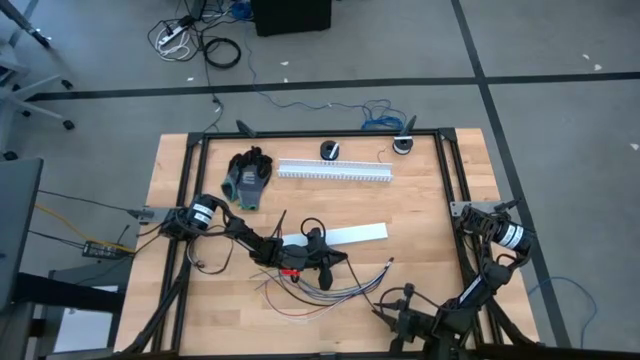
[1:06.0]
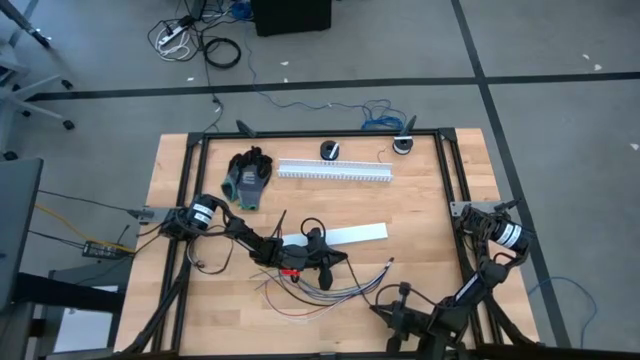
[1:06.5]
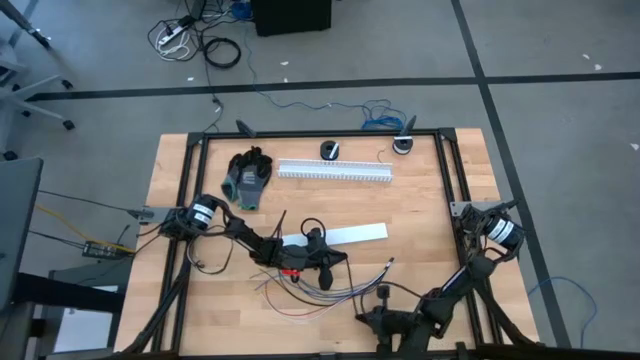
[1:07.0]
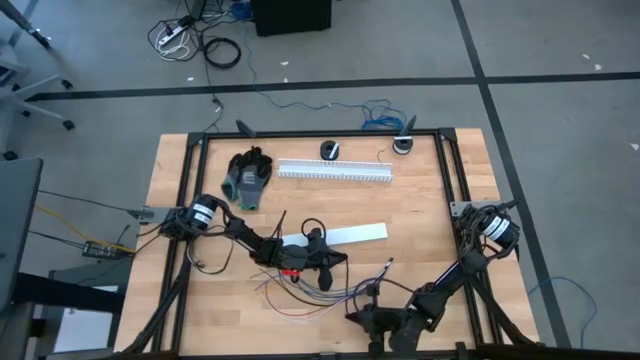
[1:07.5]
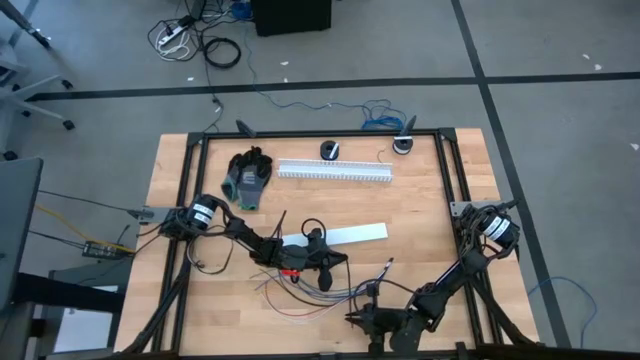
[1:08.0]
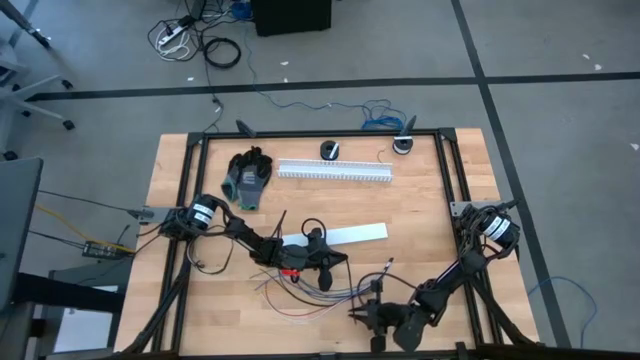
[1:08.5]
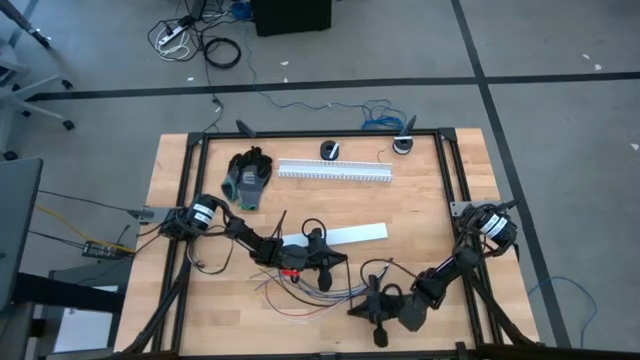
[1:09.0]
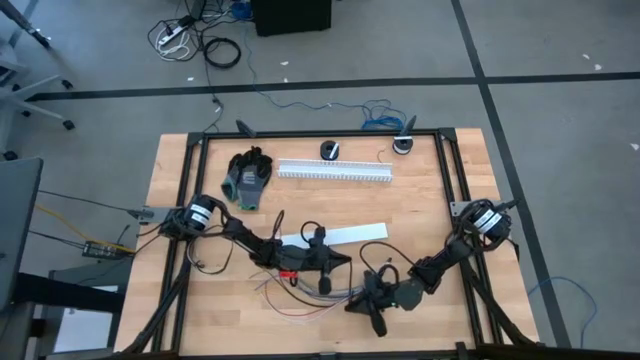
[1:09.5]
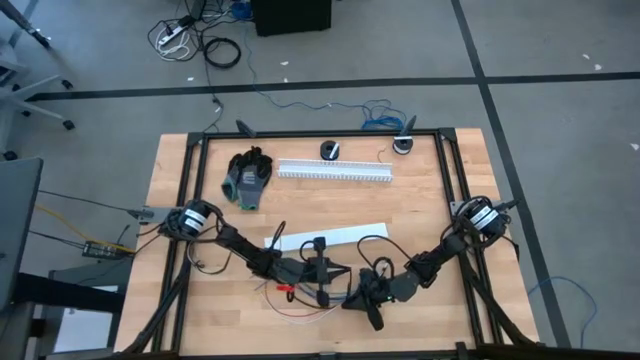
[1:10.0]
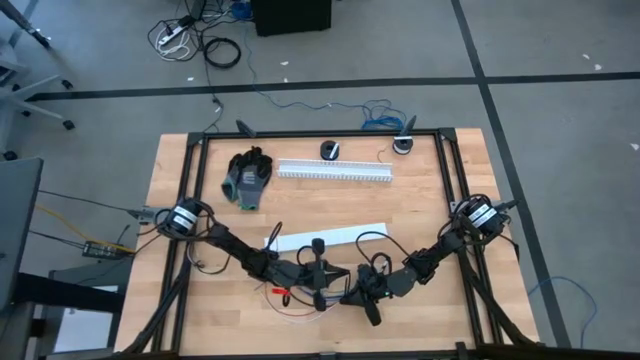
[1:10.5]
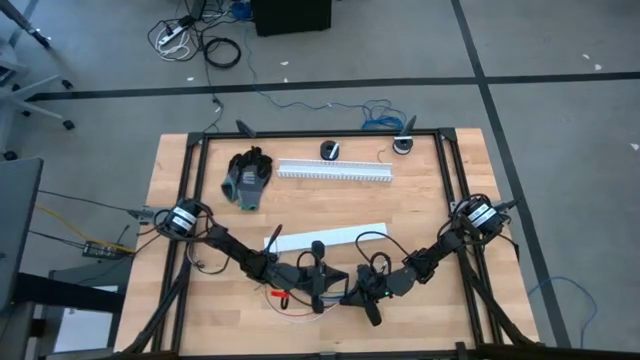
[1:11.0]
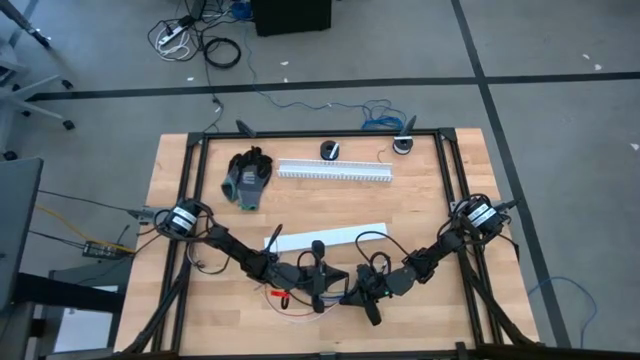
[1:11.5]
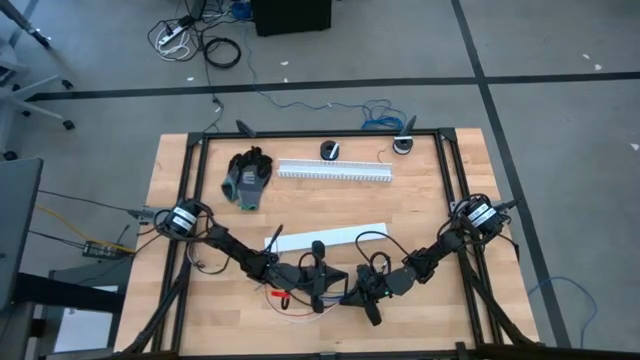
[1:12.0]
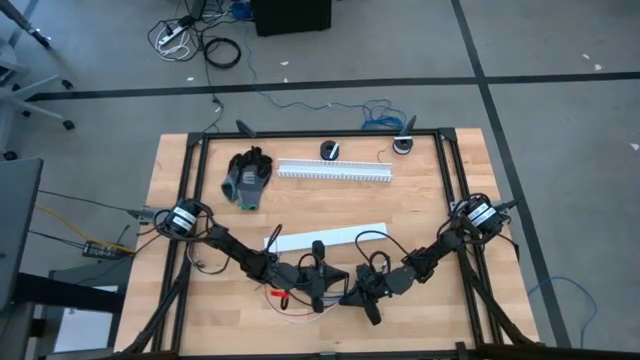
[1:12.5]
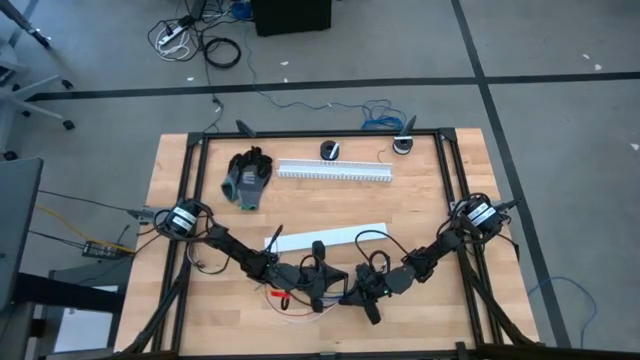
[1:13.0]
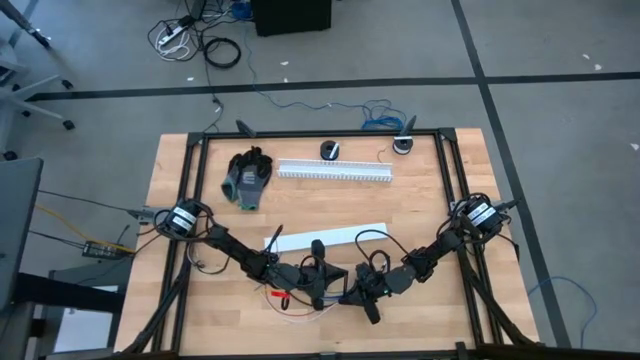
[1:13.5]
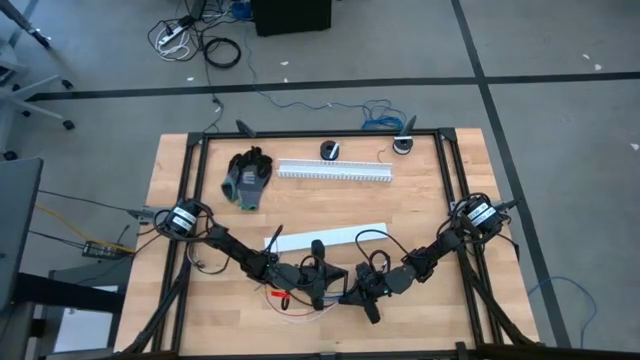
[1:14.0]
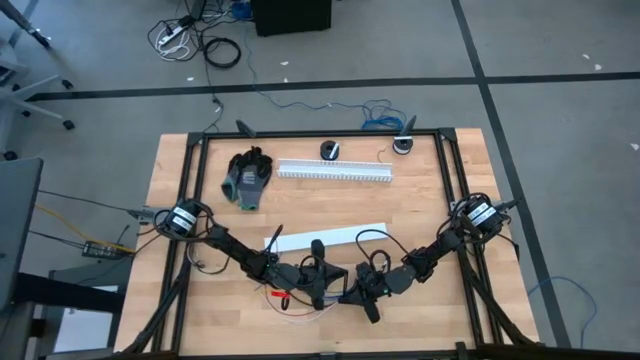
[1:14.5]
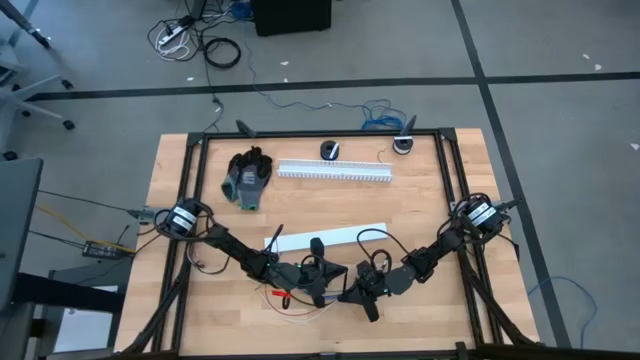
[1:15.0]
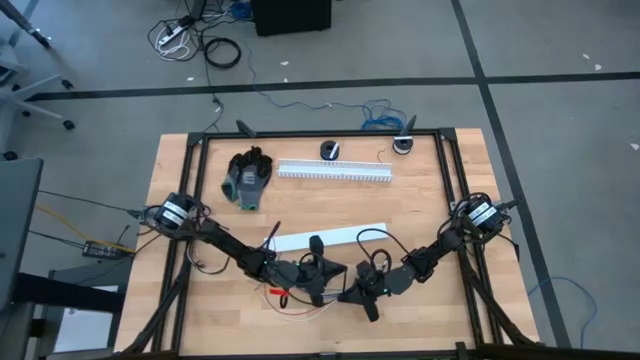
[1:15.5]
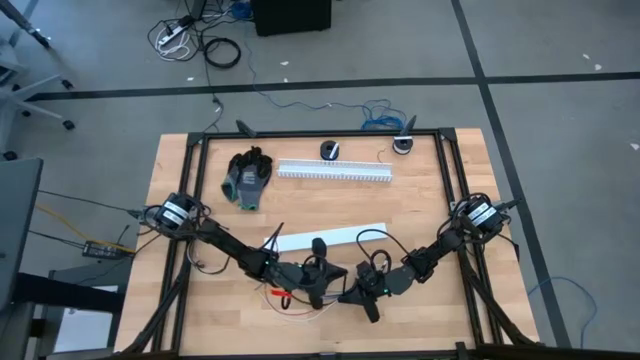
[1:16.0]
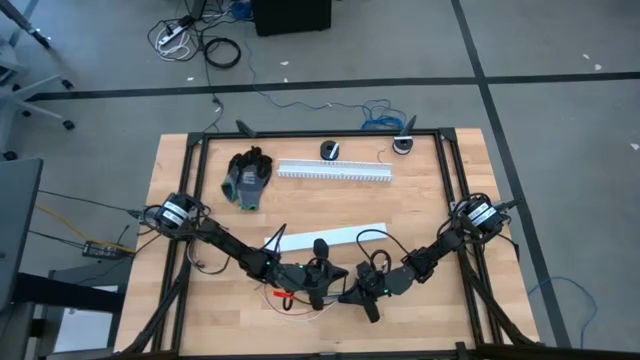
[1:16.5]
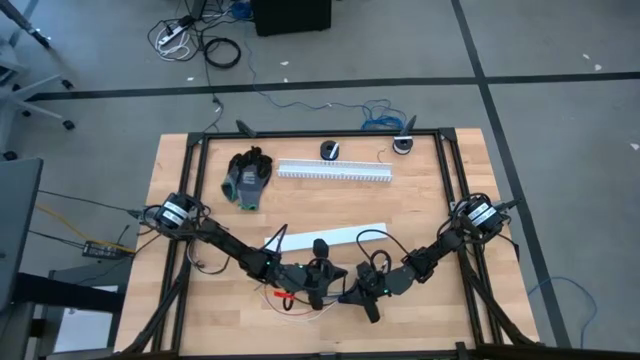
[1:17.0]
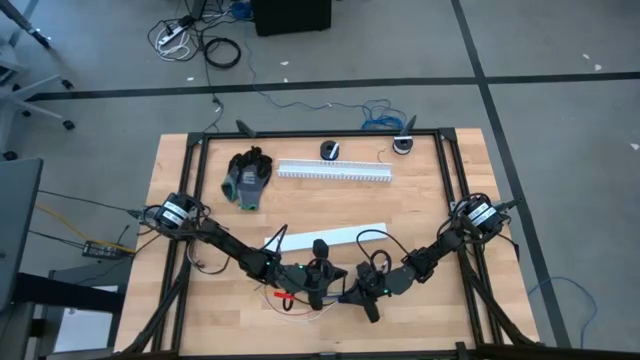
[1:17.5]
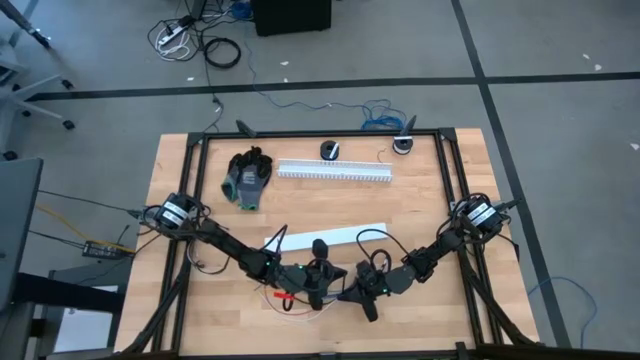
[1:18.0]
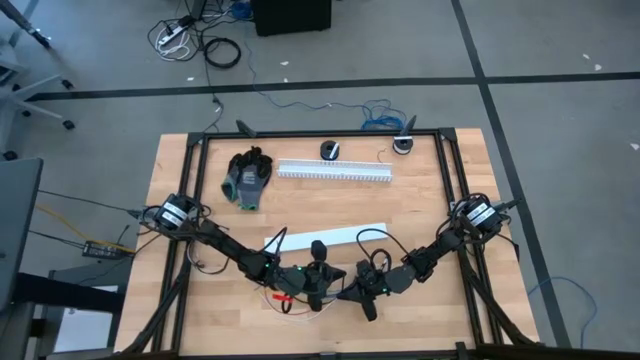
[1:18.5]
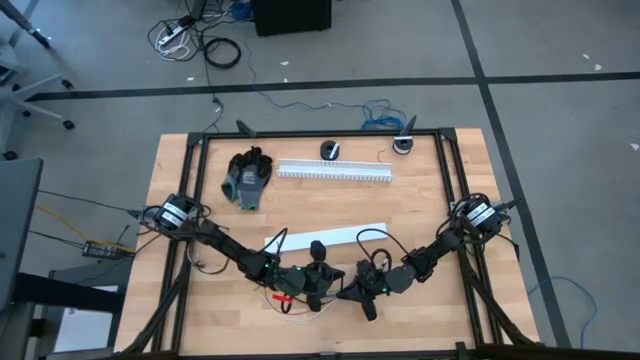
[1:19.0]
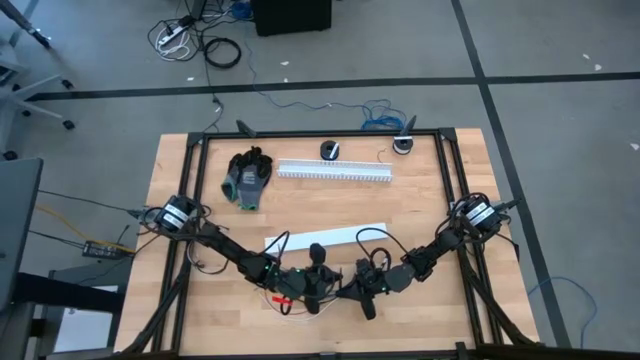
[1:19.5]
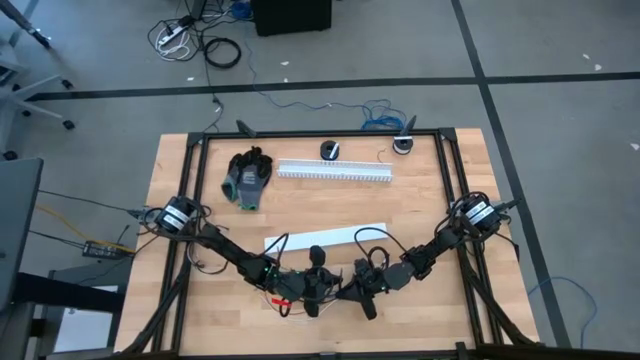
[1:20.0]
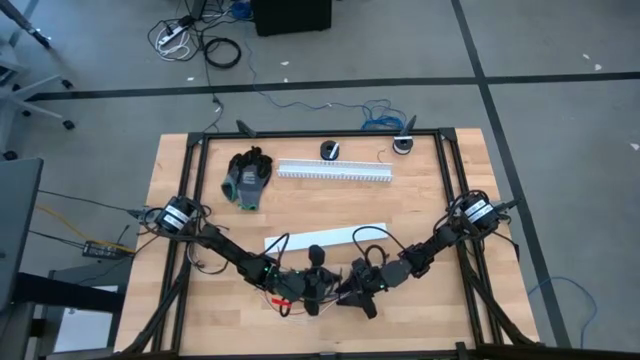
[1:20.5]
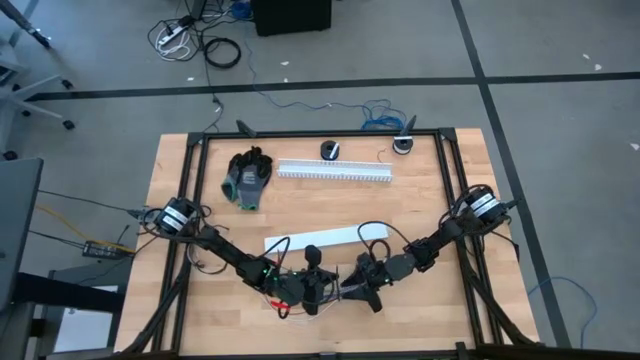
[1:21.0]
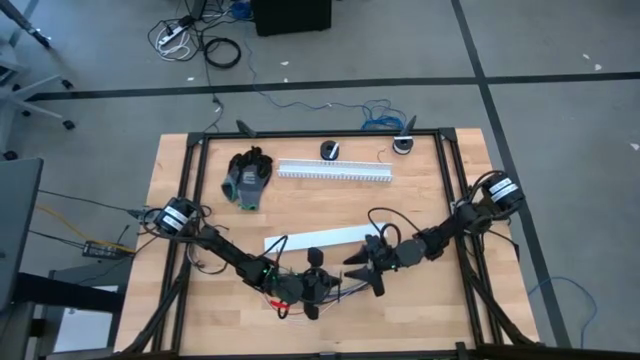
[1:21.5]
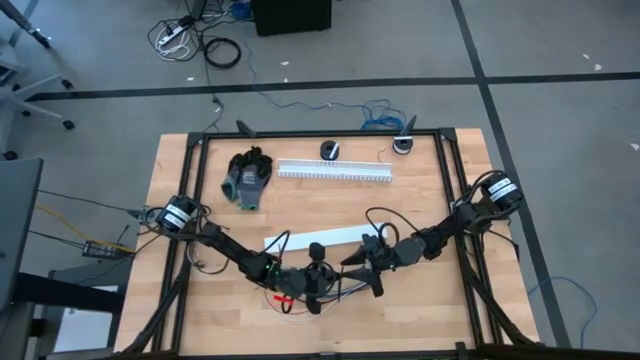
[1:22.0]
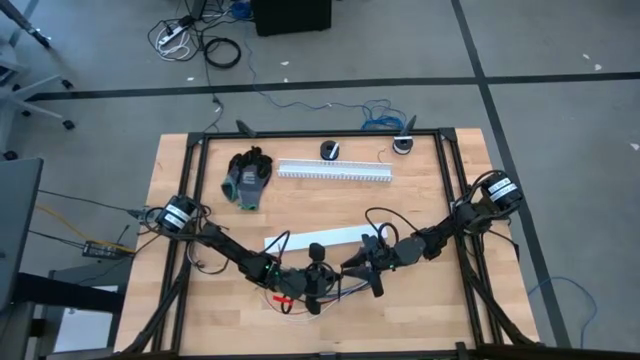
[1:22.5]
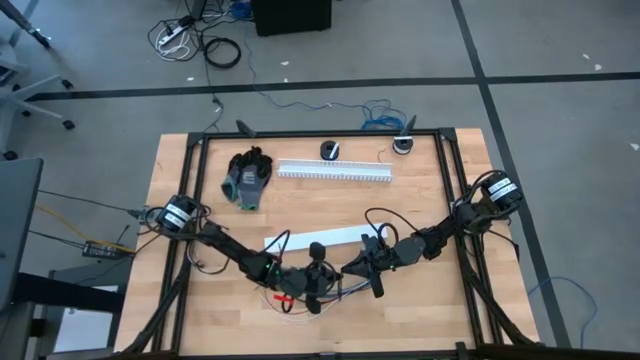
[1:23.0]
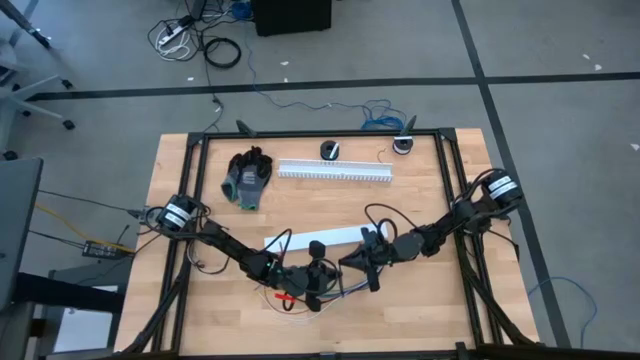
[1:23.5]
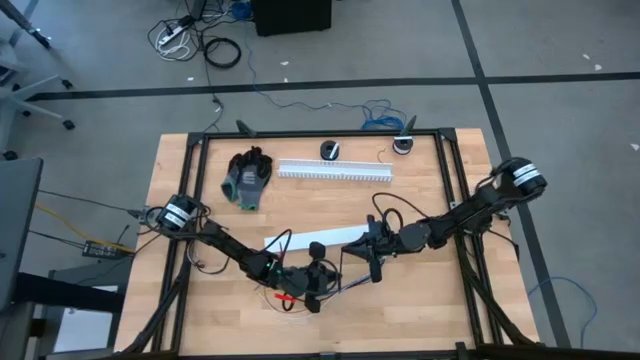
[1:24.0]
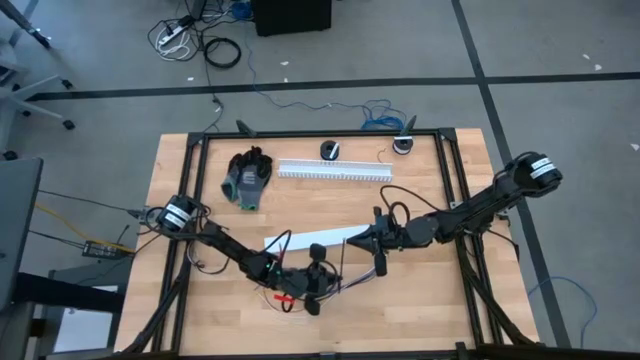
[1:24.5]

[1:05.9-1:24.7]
Task: Ziptie cables
Wrap the black zip tie around the cables

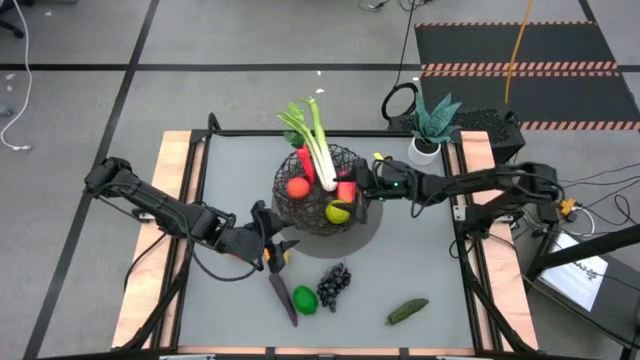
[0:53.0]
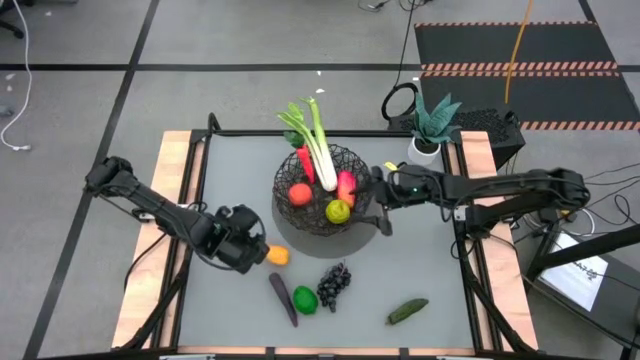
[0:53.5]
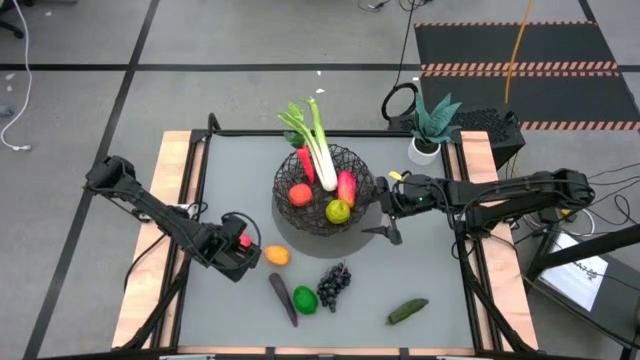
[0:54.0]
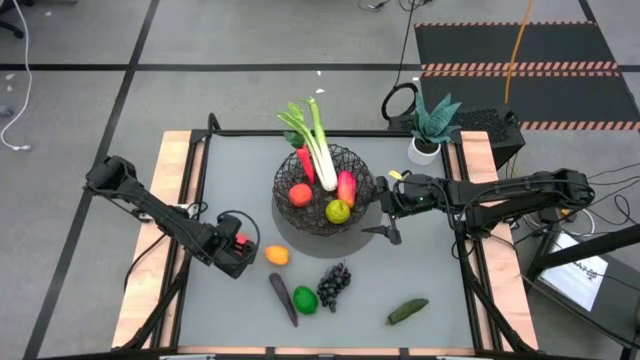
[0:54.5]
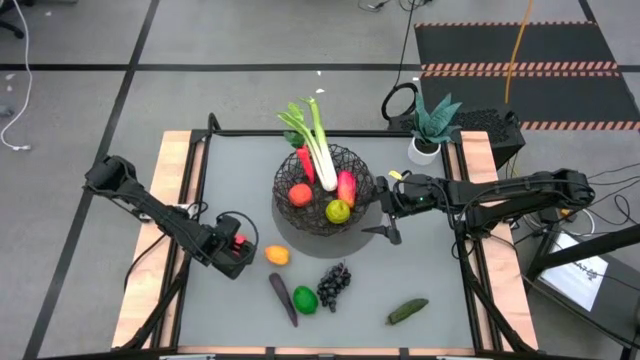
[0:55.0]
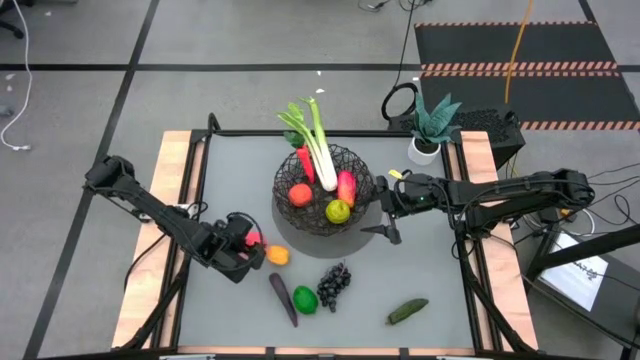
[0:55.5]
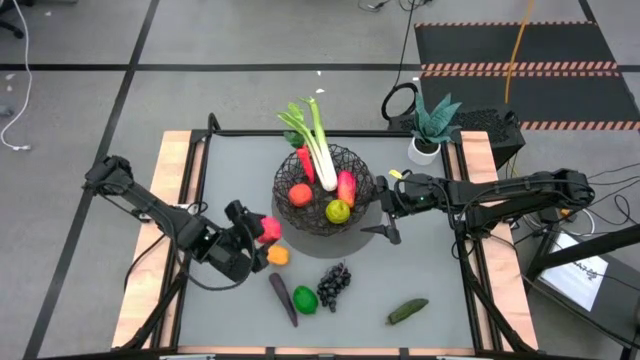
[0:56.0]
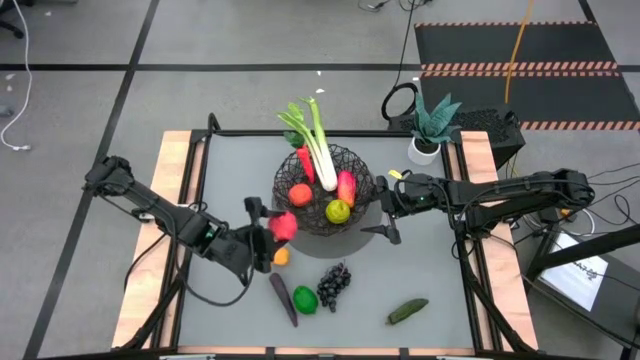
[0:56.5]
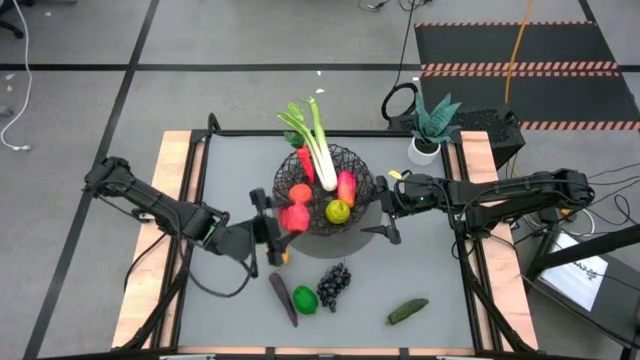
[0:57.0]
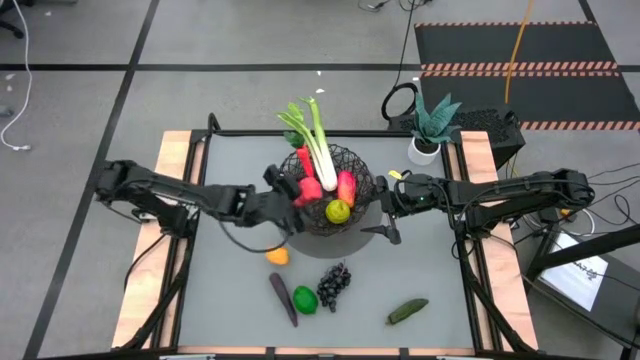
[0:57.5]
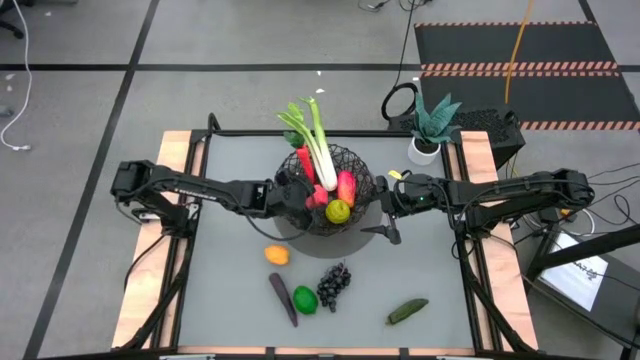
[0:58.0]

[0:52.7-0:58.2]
Task: Build produce basket
Put the red pumpkin into the black woven basket
